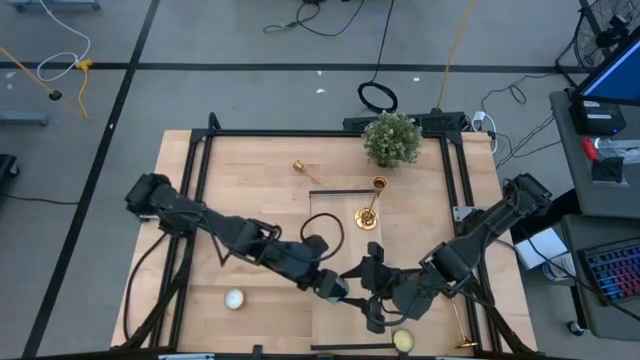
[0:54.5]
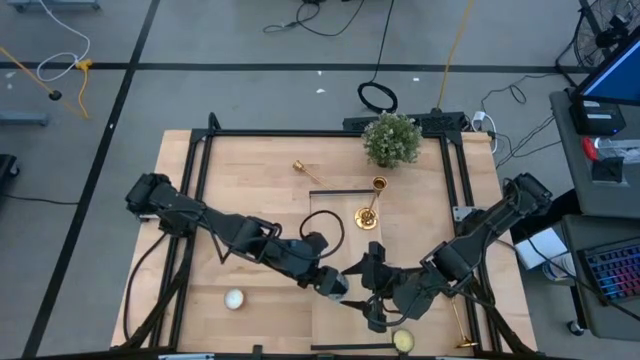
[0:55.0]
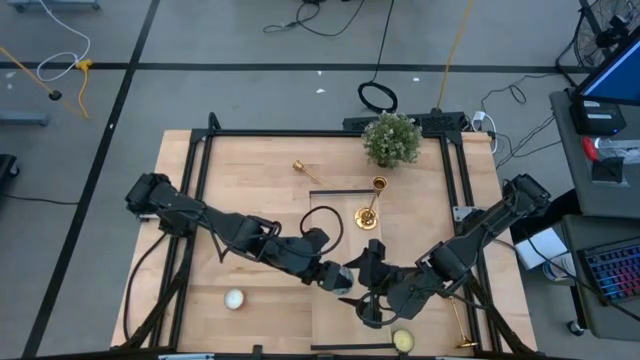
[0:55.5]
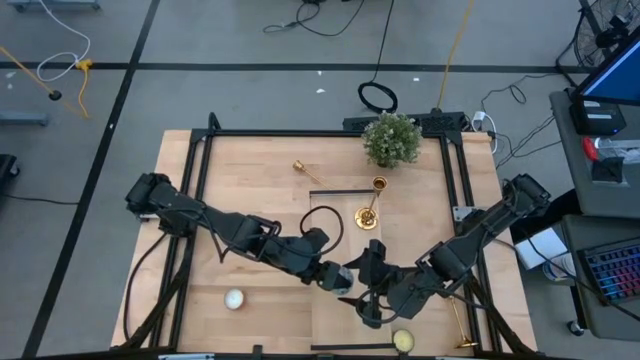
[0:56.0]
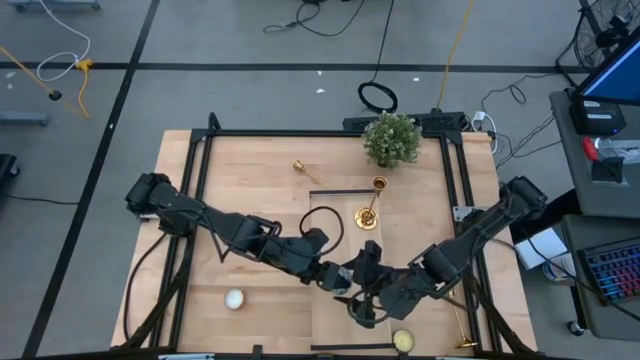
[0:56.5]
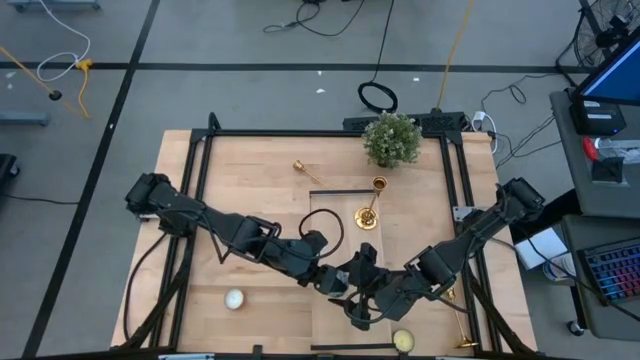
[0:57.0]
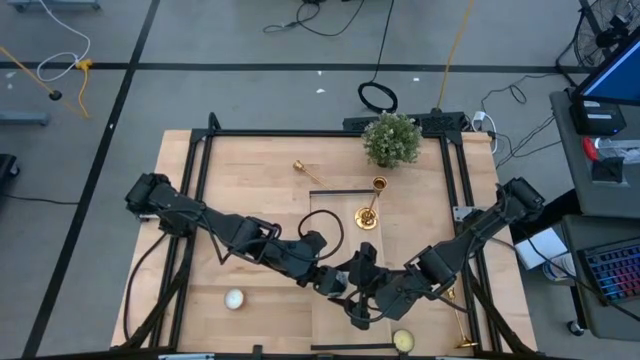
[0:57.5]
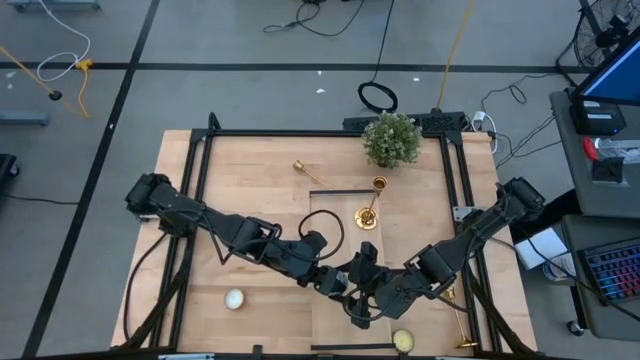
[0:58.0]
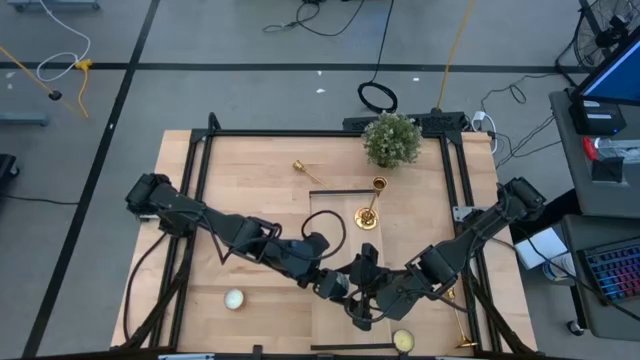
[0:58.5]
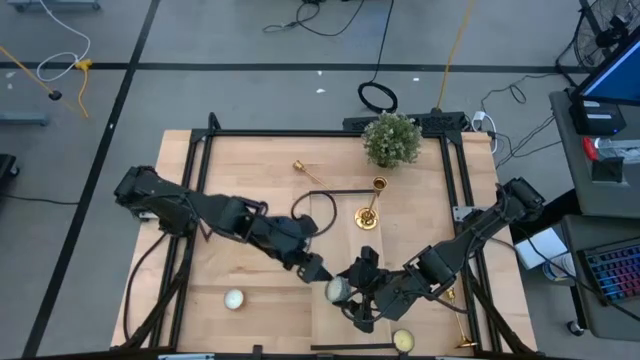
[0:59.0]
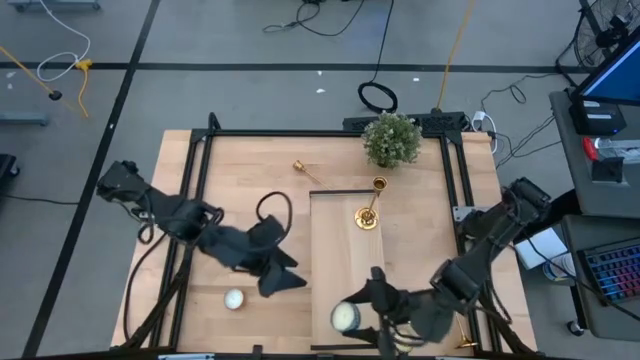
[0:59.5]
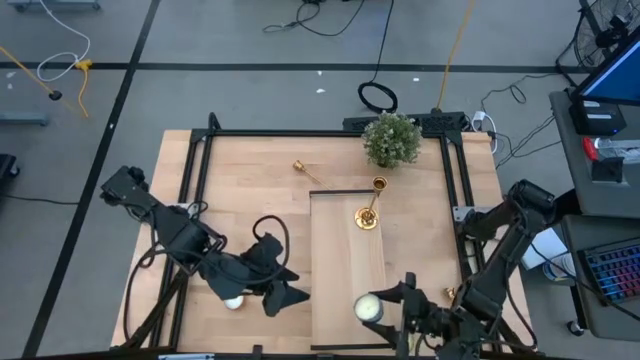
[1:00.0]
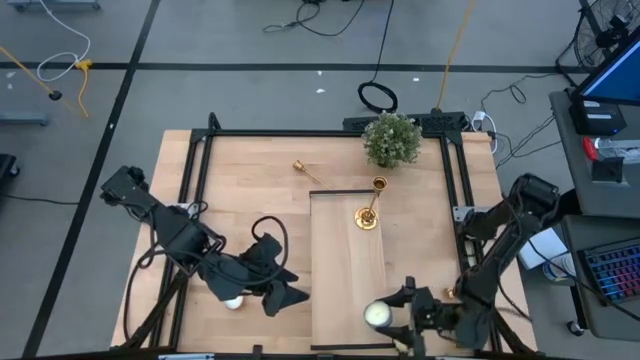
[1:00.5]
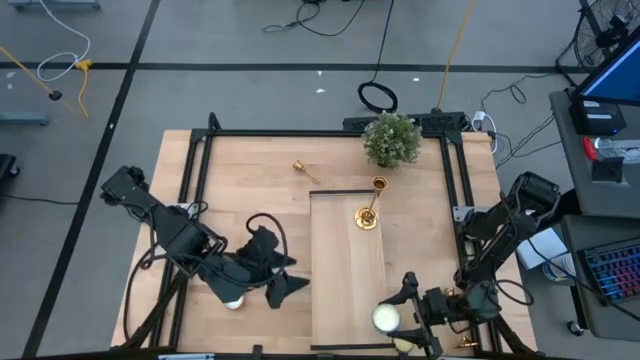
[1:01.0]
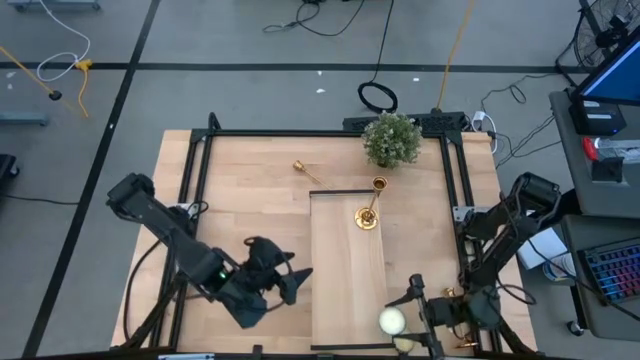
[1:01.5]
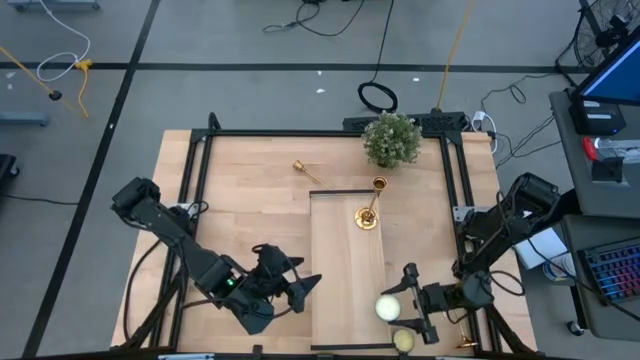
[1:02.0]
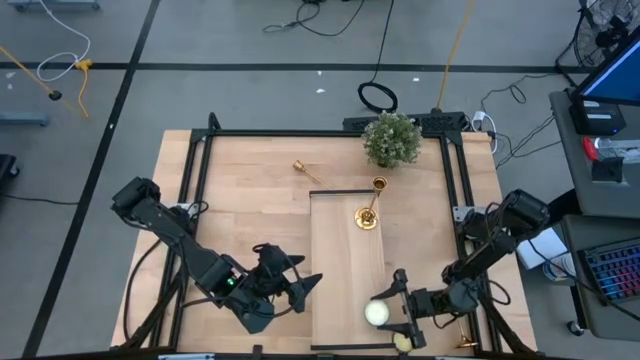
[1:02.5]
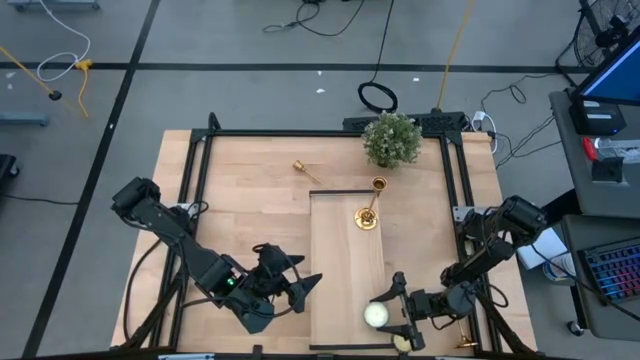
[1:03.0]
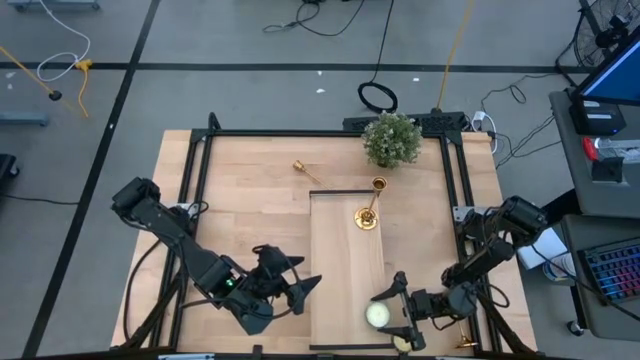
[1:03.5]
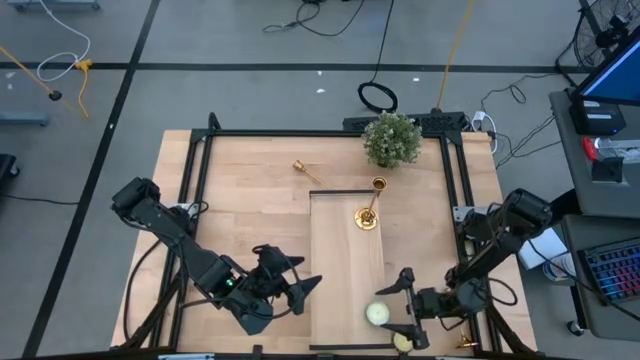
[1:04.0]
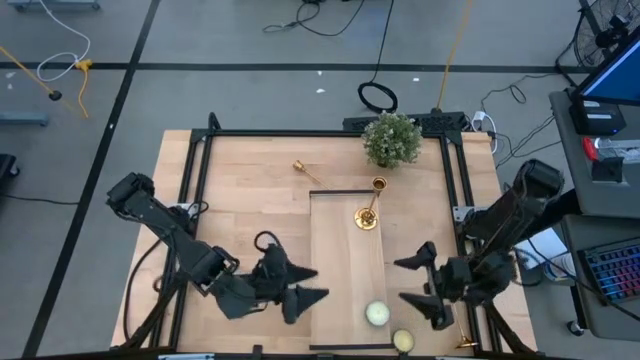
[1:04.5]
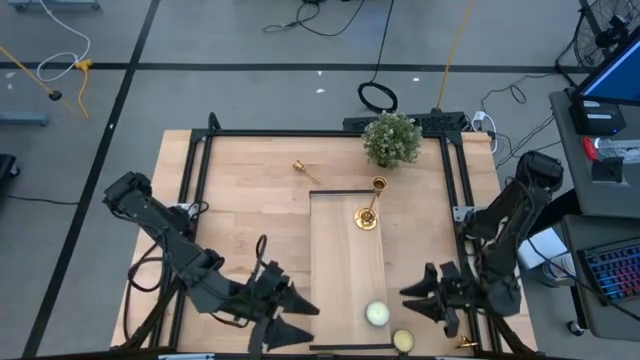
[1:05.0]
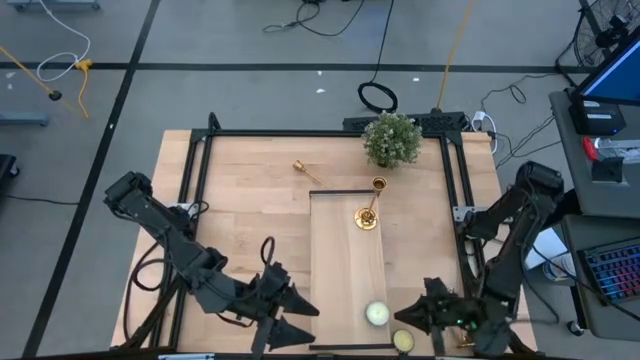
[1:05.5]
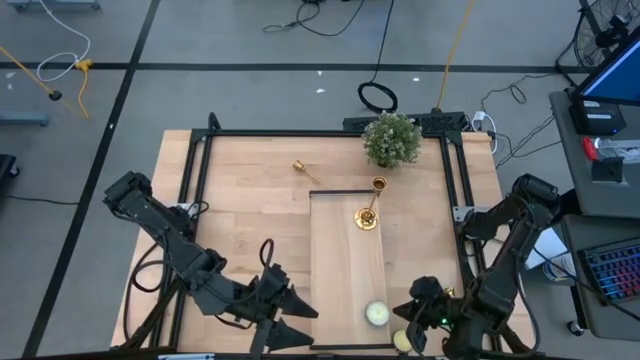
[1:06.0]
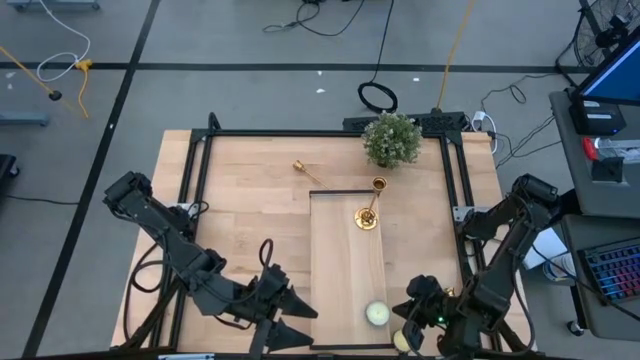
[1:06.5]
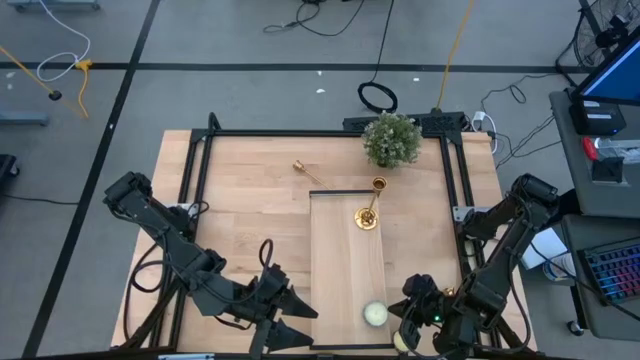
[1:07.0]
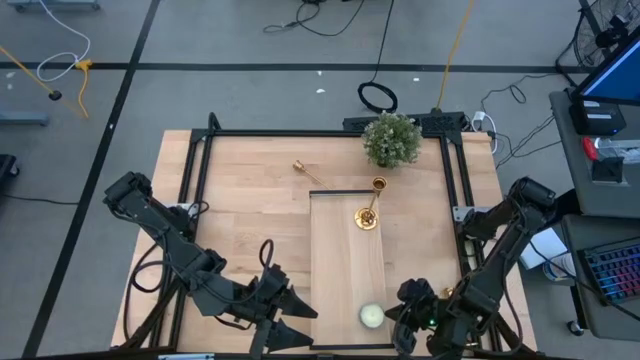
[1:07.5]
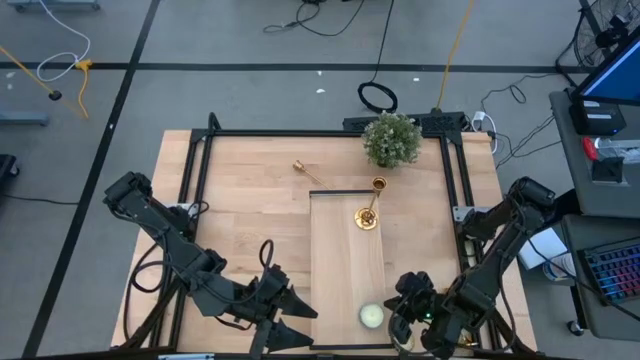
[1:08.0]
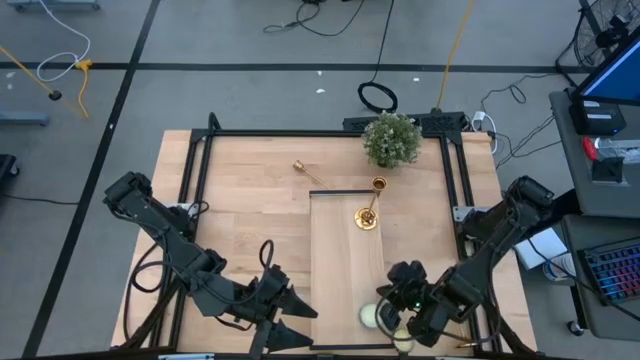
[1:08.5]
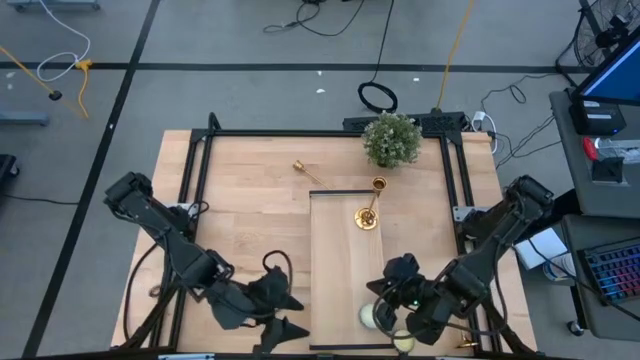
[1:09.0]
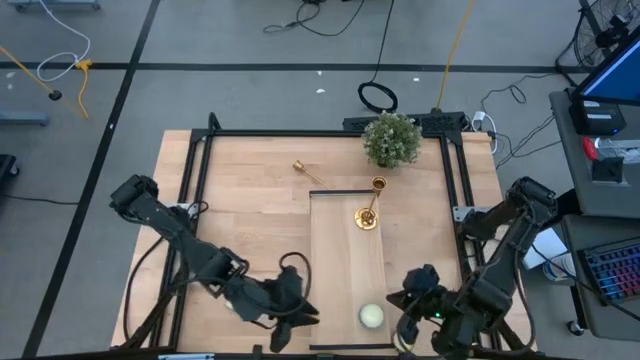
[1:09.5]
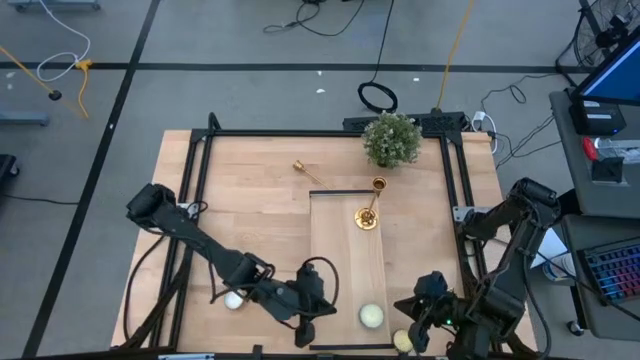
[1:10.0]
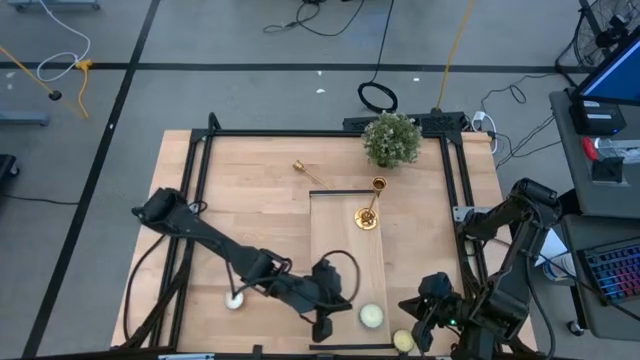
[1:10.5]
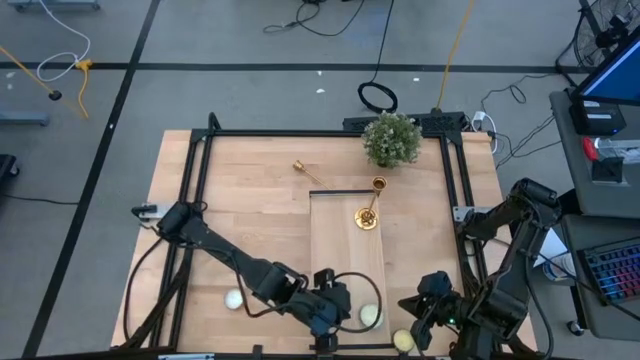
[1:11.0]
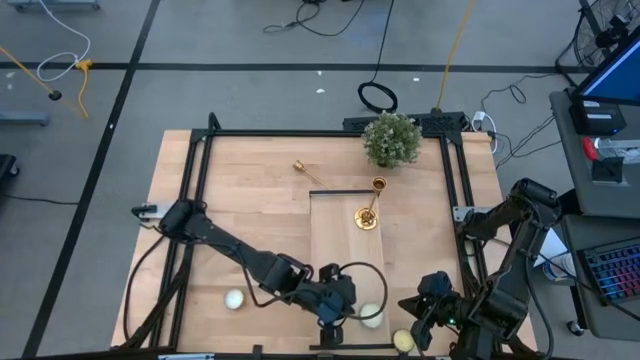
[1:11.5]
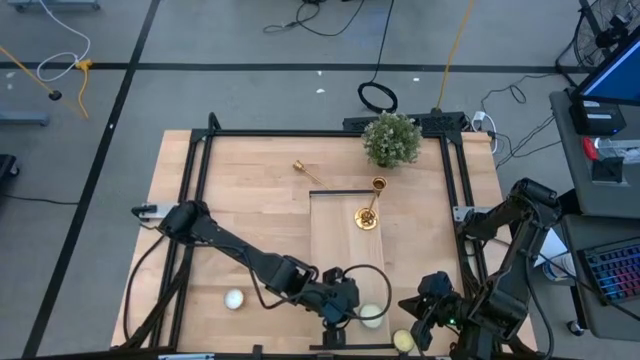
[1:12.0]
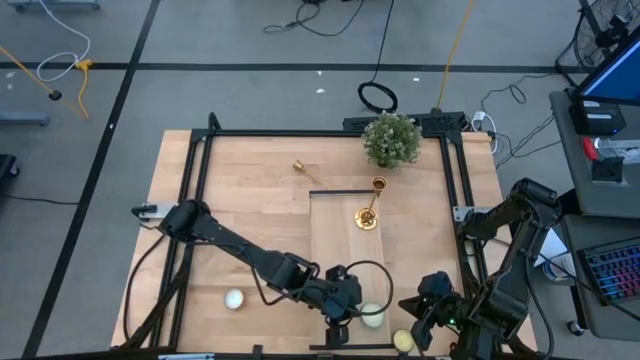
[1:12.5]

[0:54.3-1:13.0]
Task: Pick & Place candle stick holders
Put the blue patterned scented candle on the shelf

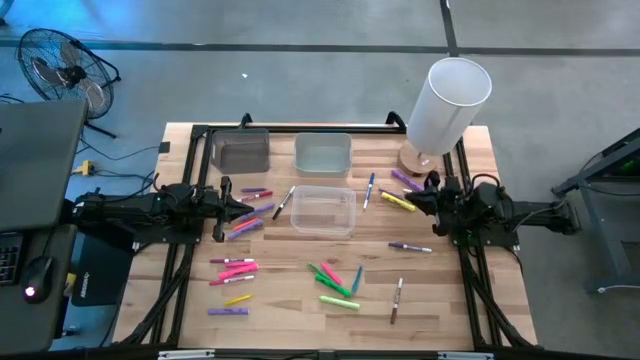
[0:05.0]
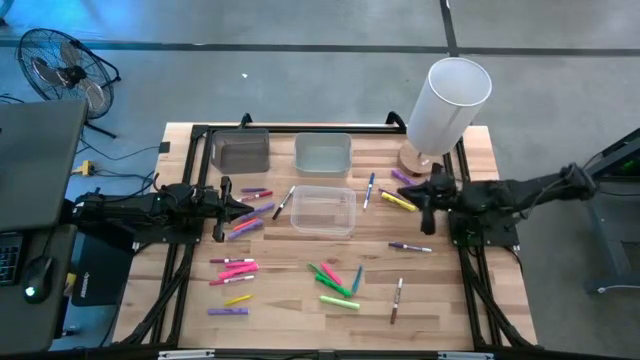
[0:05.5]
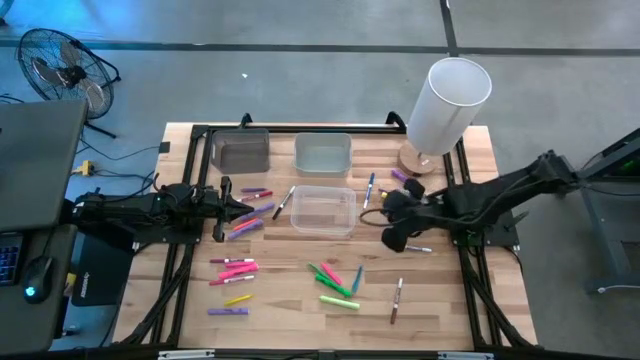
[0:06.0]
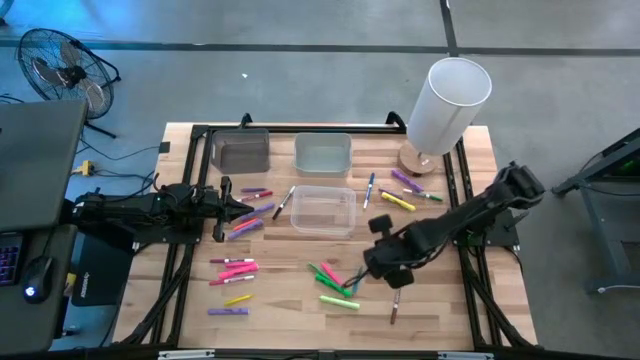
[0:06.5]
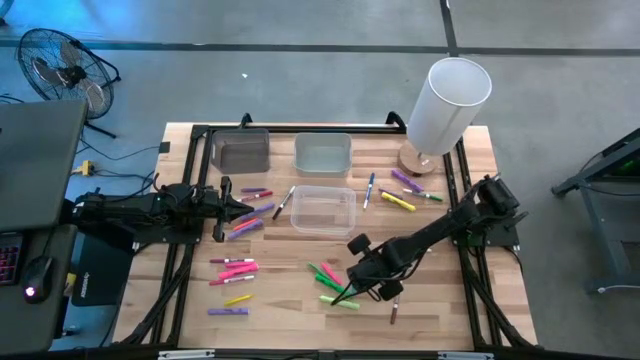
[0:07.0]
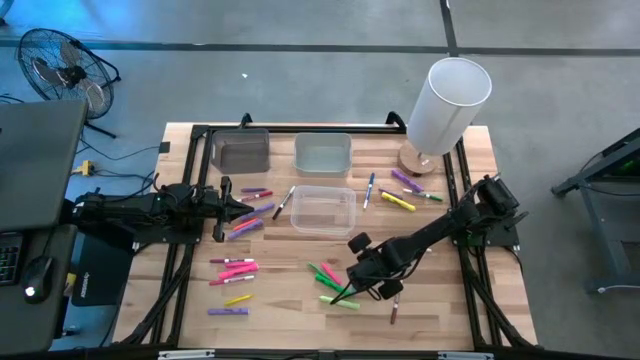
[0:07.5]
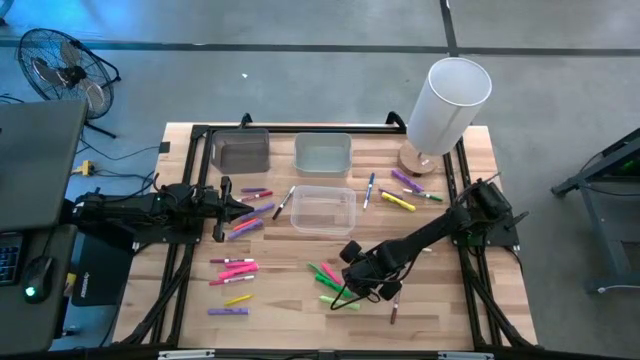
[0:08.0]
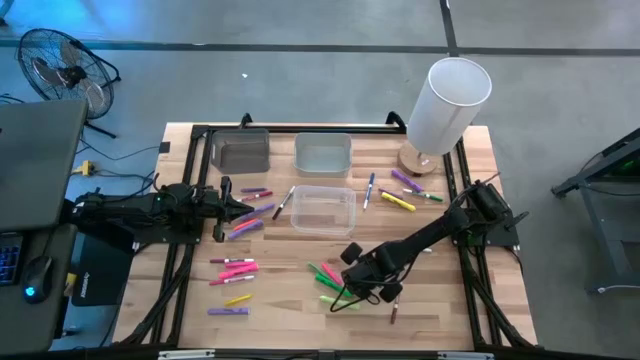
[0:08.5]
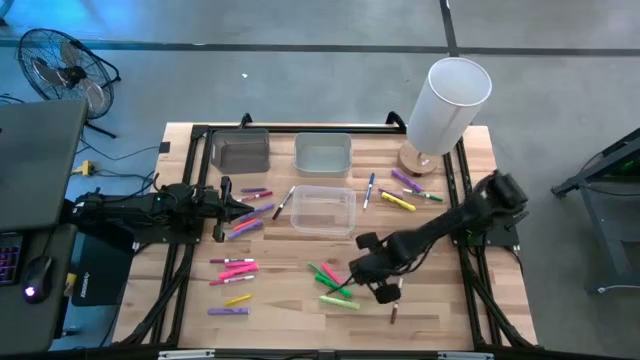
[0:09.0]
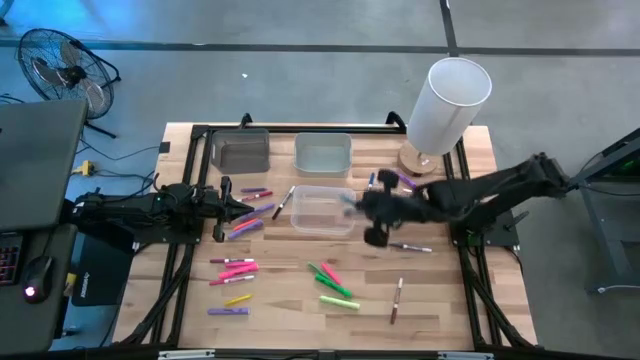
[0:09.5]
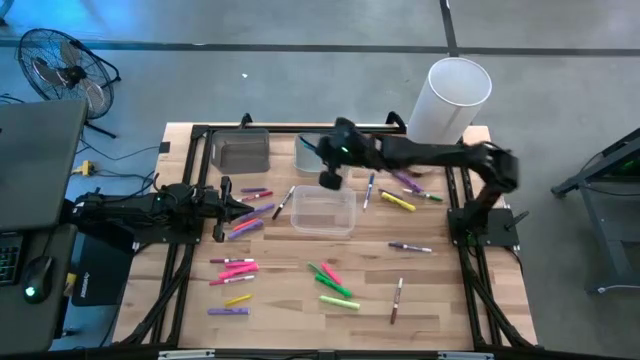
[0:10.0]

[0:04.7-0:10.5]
Task: Pick & Place Markers
Put the blue pen into the gray bin
